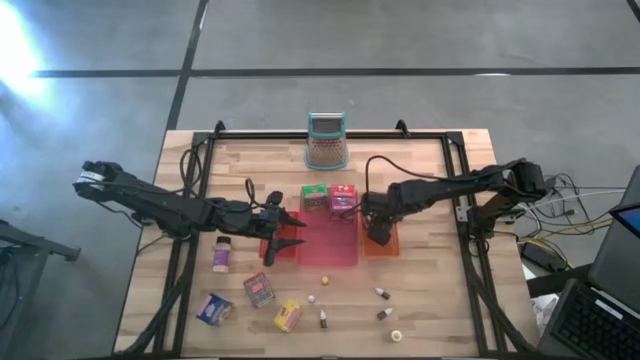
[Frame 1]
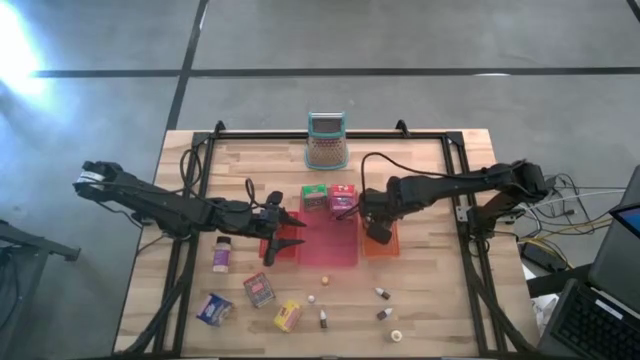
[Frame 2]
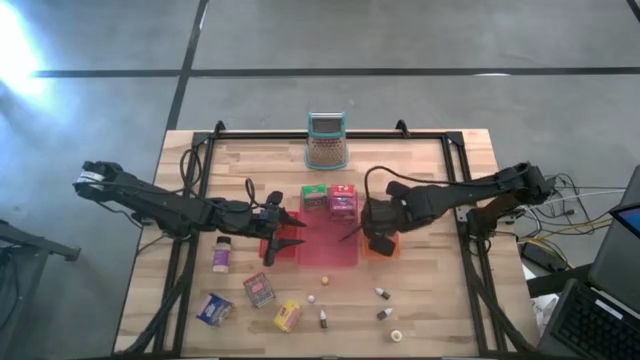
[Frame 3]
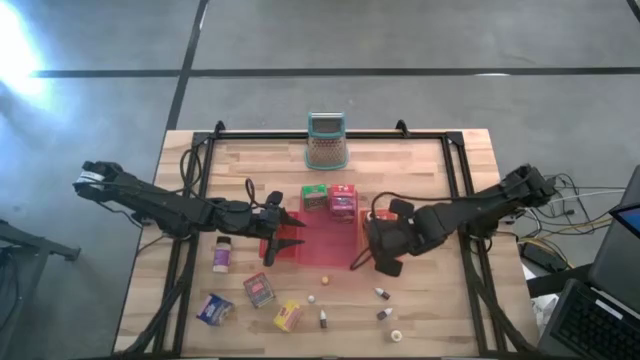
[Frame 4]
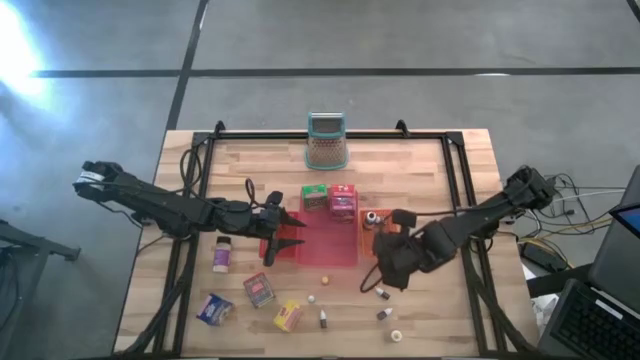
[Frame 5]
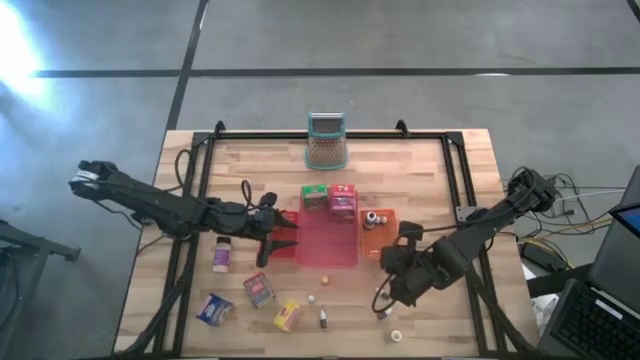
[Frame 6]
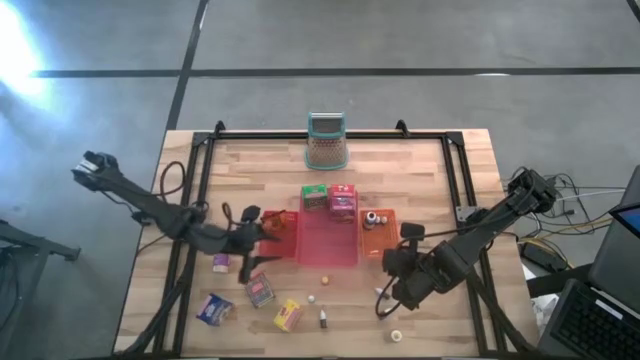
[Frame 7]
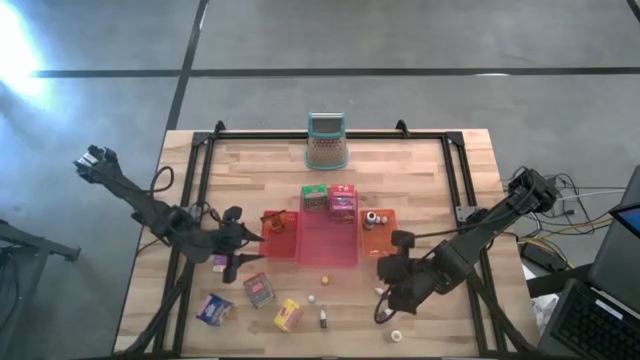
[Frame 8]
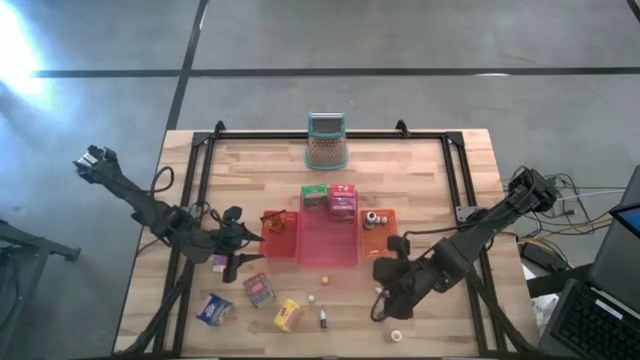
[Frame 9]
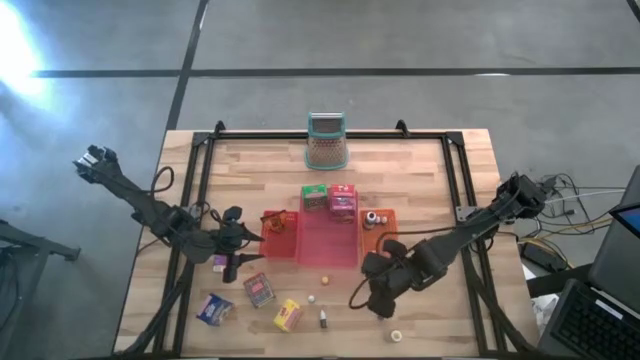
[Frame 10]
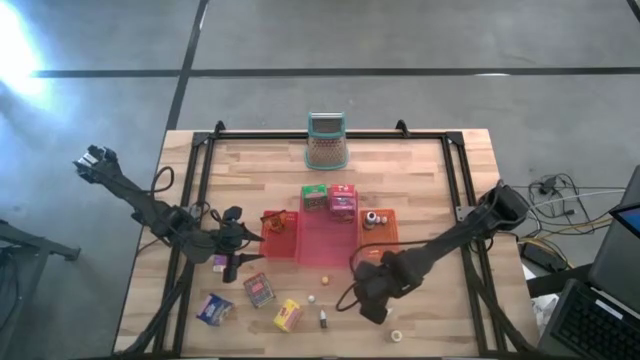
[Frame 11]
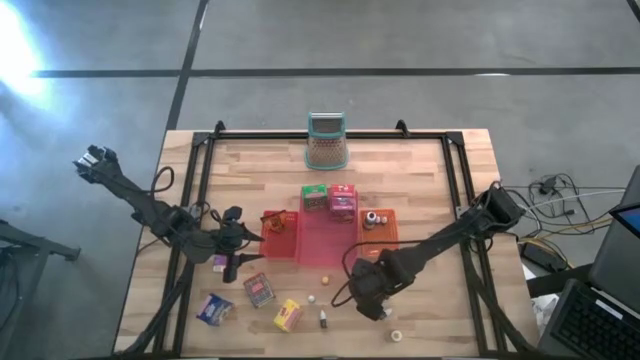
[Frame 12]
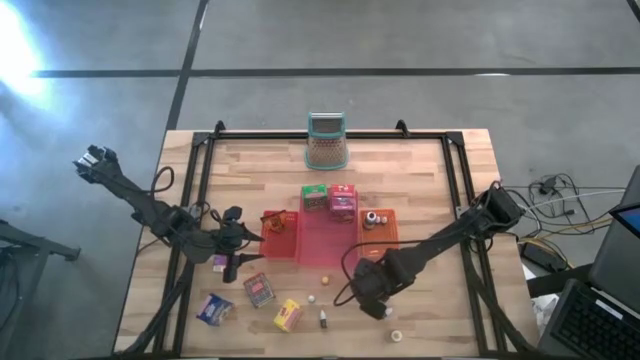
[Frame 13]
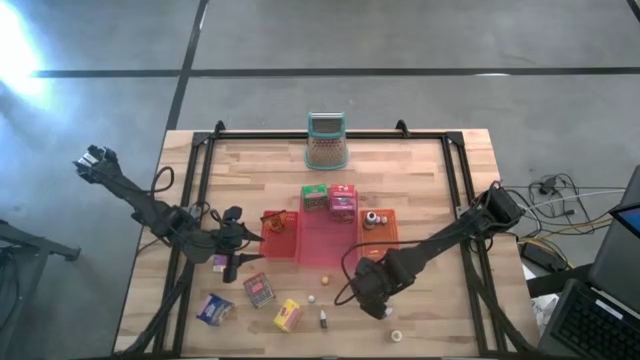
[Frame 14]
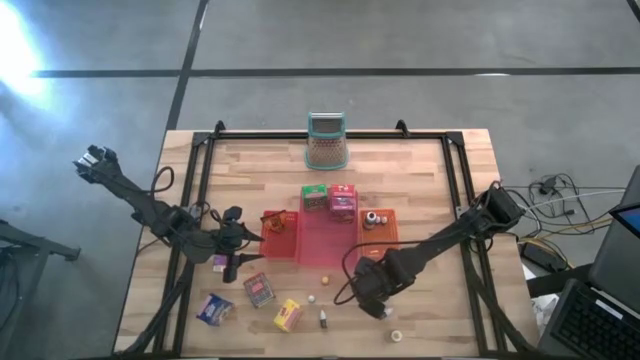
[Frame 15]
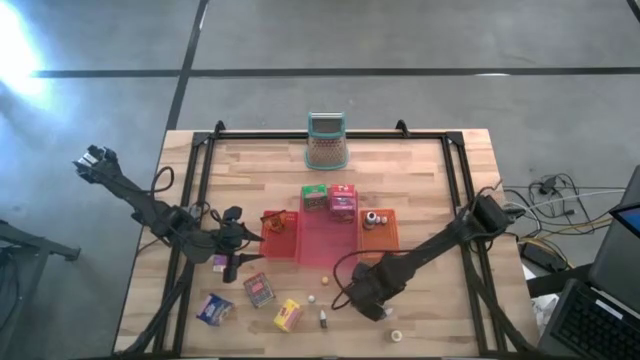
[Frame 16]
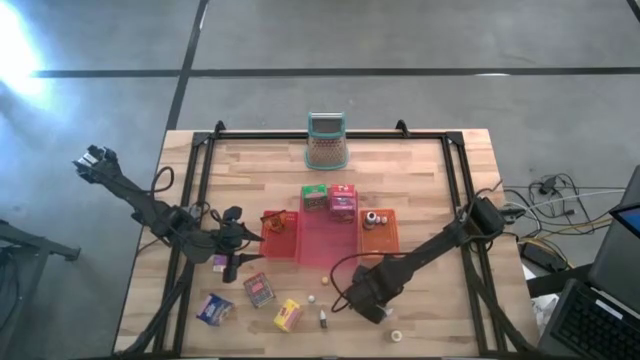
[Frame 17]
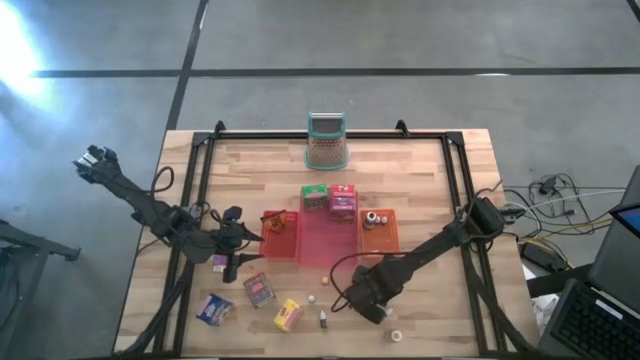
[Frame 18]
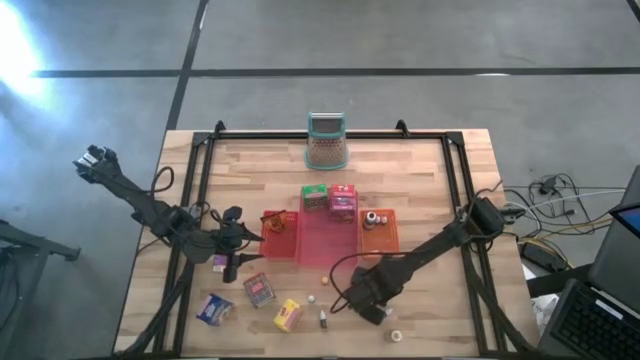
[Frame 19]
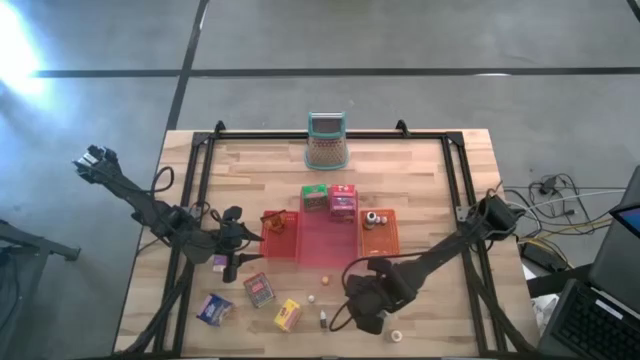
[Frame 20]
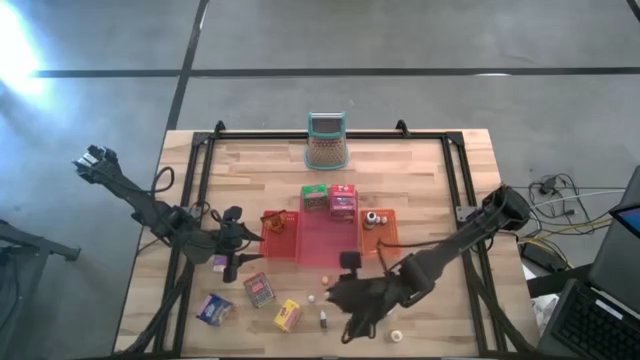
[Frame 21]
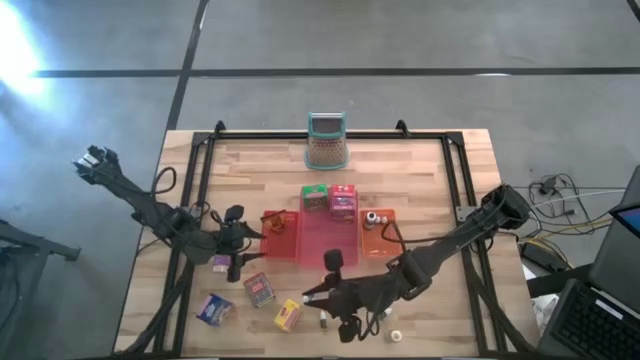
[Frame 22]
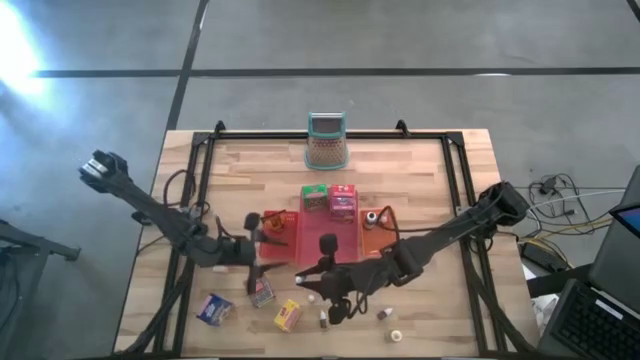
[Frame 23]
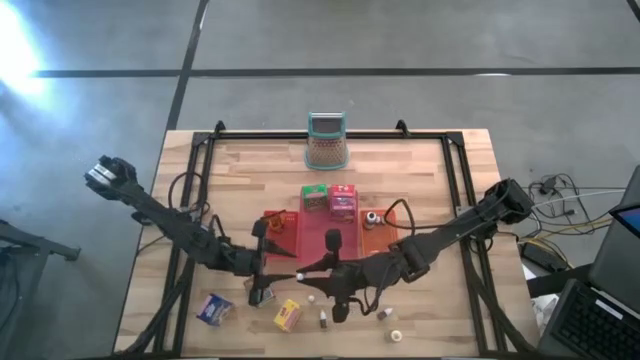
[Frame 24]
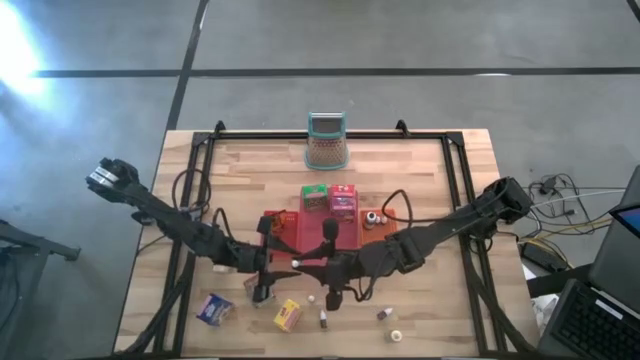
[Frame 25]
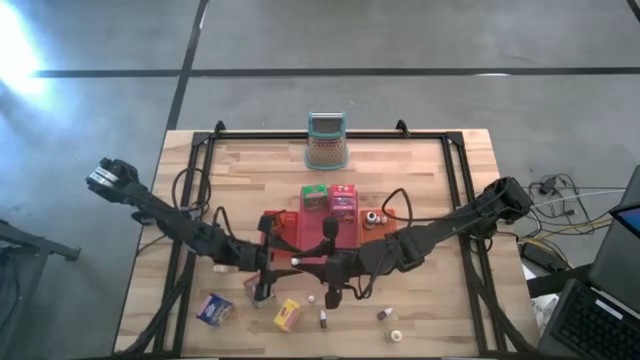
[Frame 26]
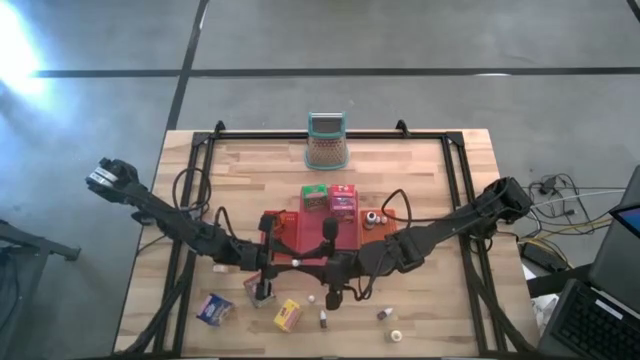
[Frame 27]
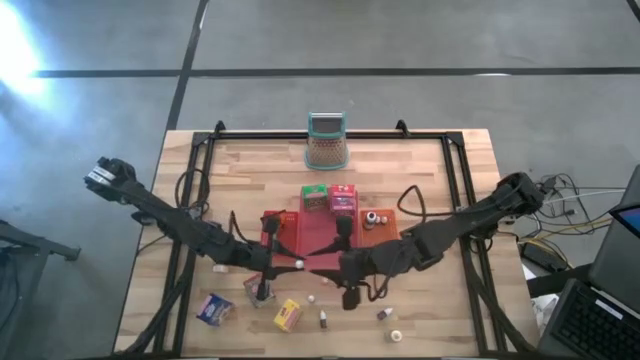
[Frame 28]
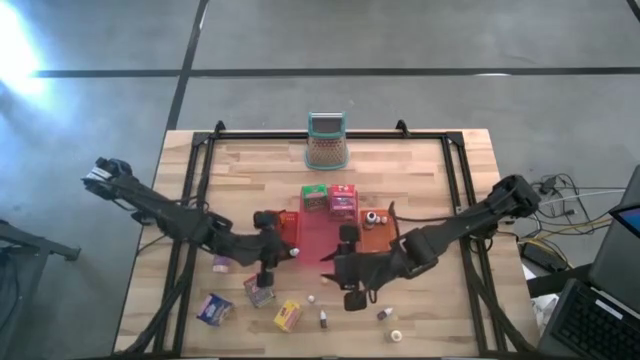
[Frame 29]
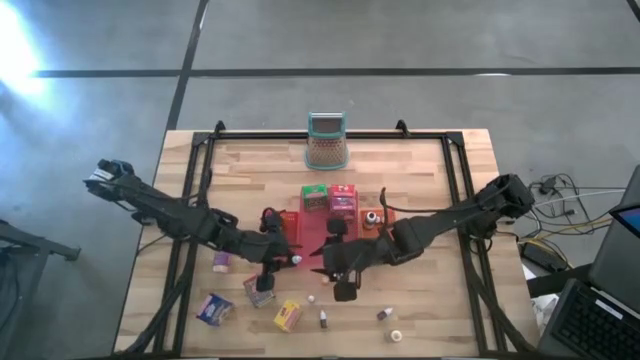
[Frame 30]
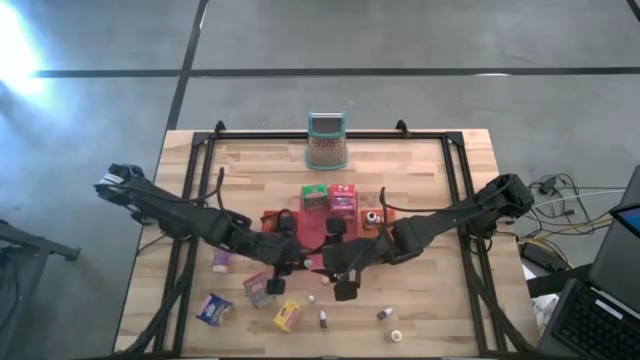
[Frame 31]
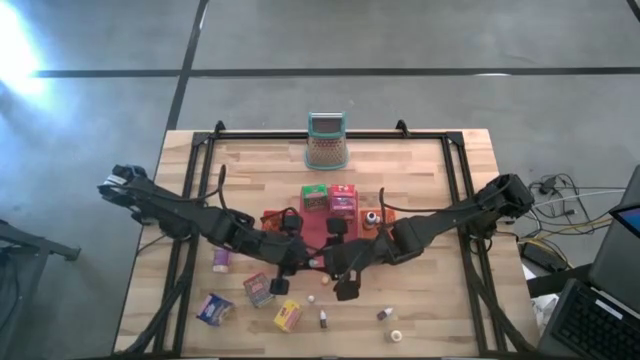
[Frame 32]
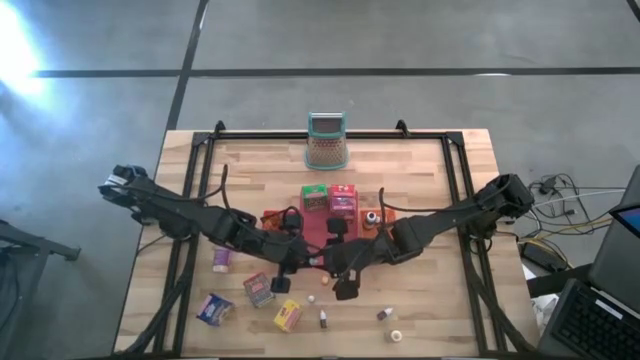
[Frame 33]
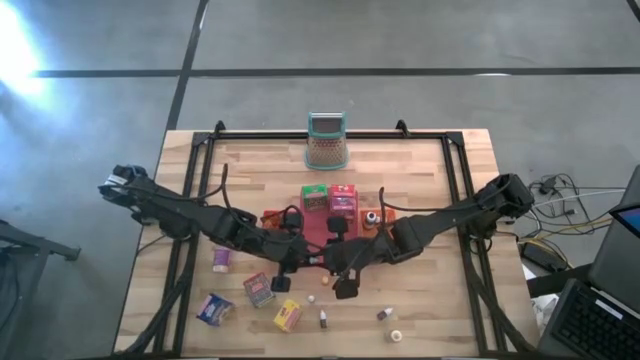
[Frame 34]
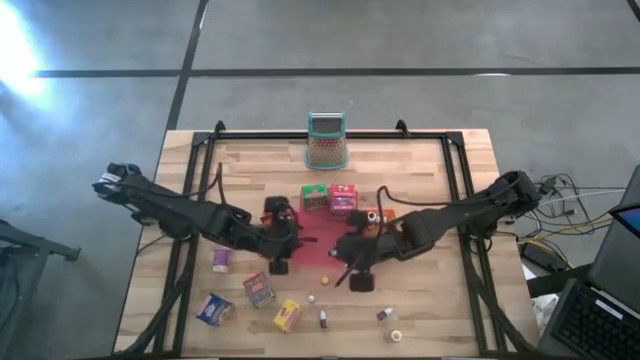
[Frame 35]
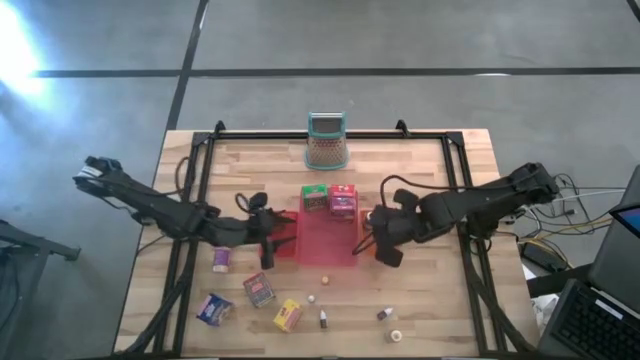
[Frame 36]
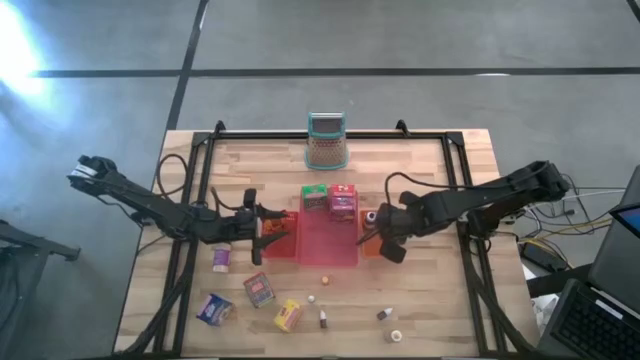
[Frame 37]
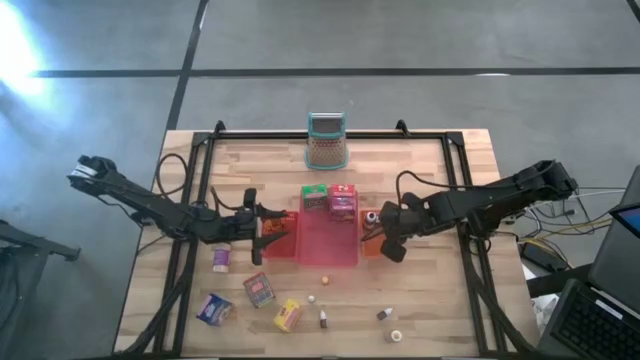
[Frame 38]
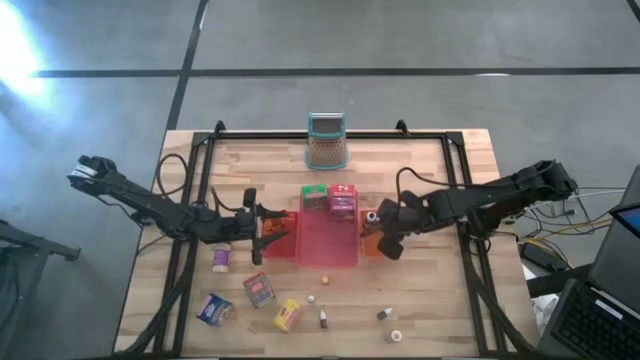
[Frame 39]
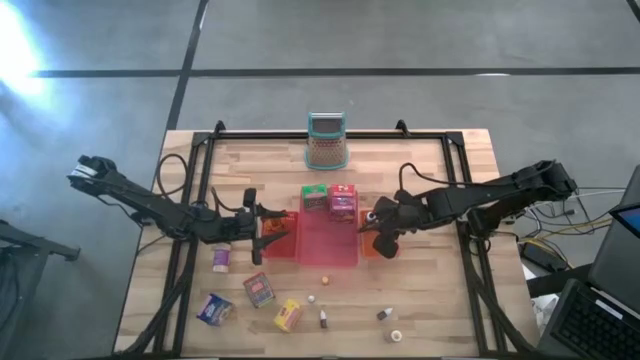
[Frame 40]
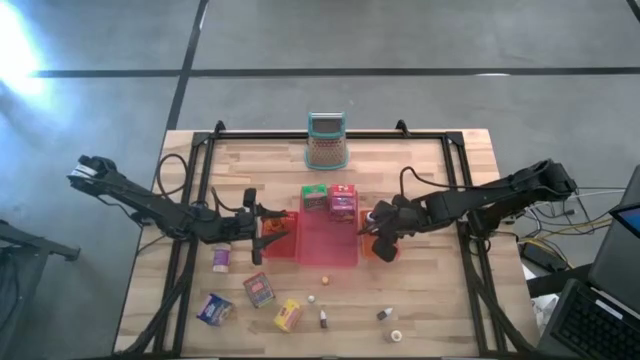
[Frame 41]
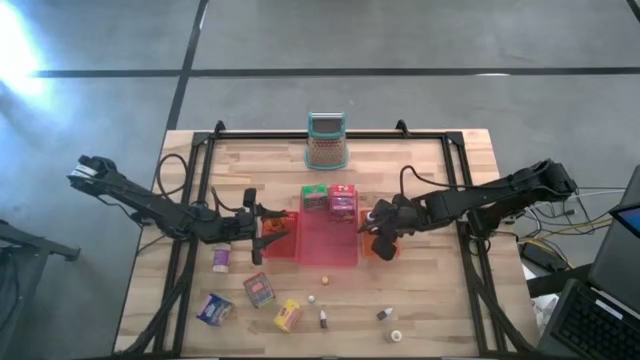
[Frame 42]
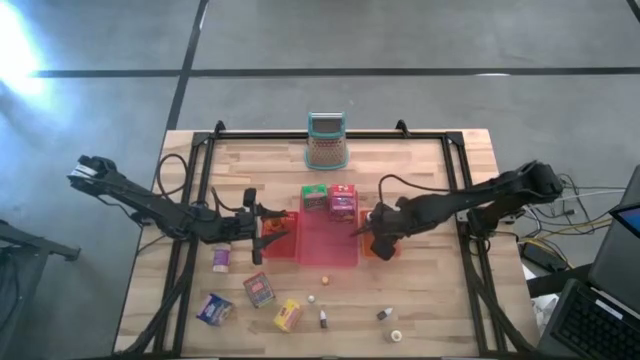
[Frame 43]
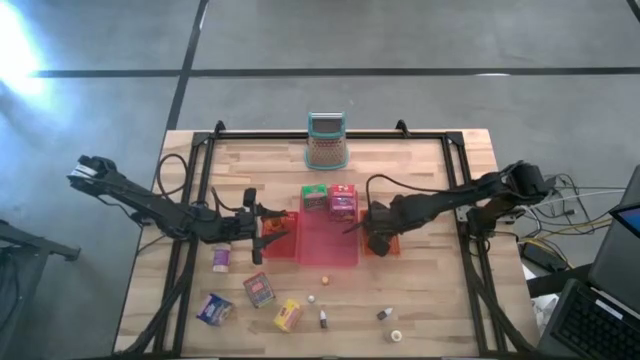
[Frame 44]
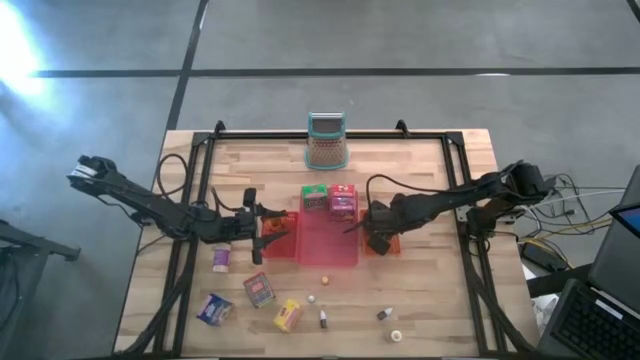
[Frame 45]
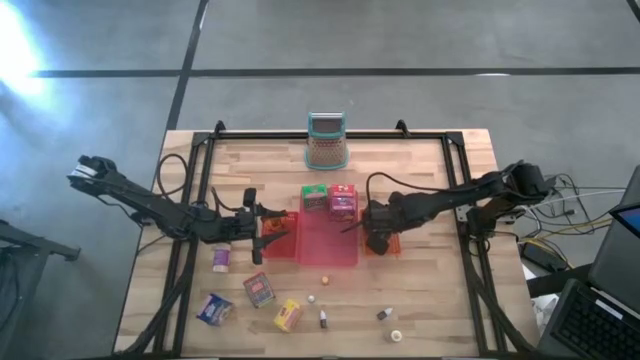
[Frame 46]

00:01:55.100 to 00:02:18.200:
Task: Pick & Place Kitchen Items
Put the small brown food coloring bottle into the orange bin
